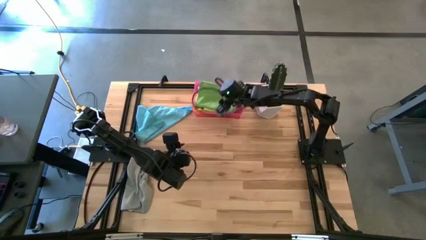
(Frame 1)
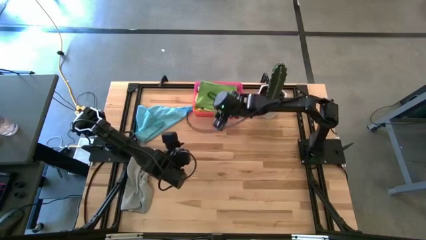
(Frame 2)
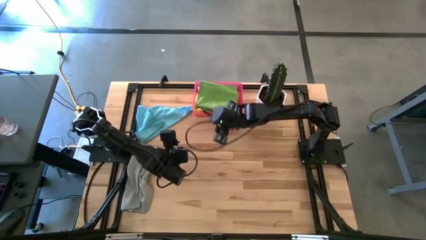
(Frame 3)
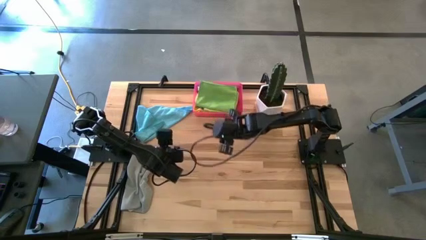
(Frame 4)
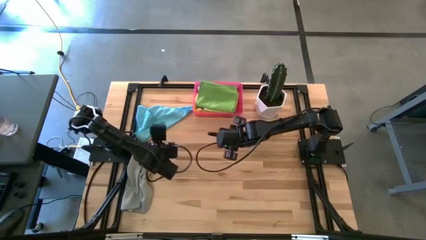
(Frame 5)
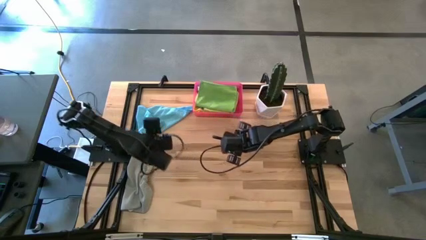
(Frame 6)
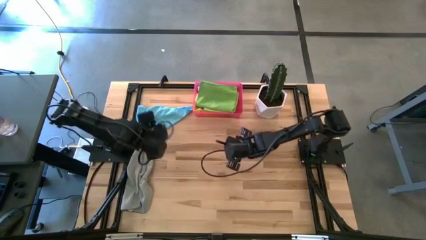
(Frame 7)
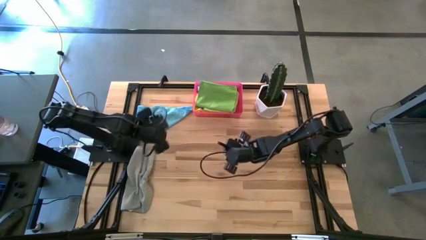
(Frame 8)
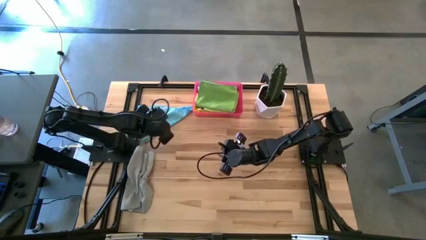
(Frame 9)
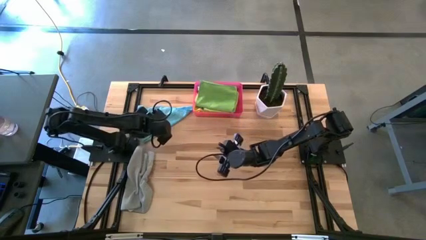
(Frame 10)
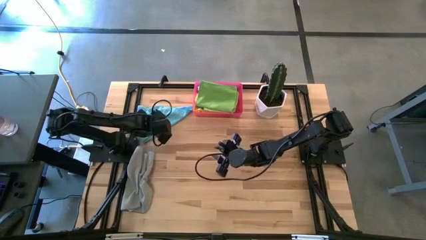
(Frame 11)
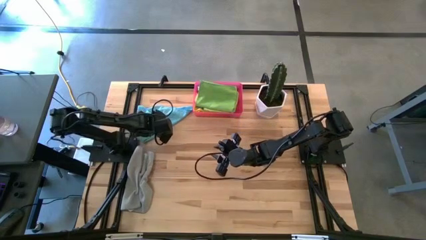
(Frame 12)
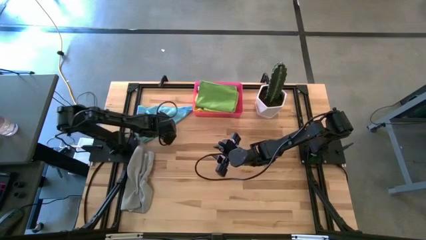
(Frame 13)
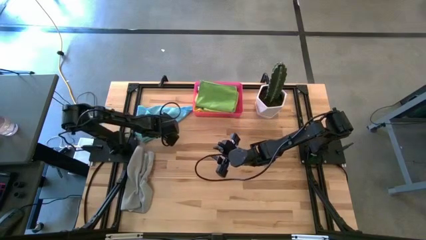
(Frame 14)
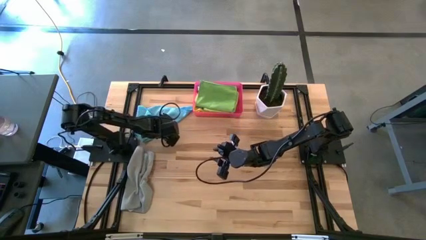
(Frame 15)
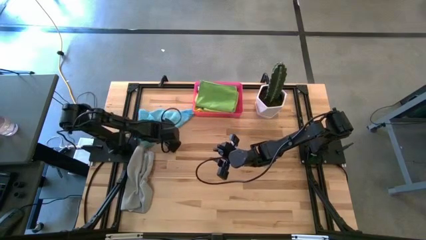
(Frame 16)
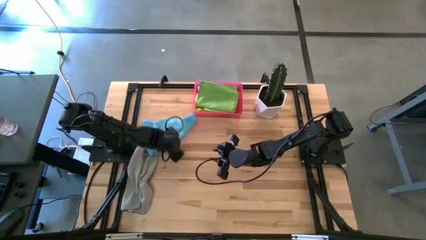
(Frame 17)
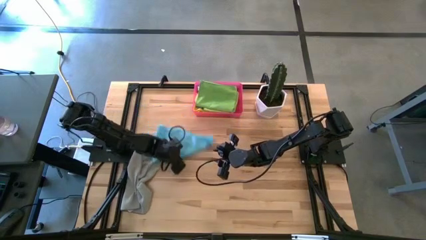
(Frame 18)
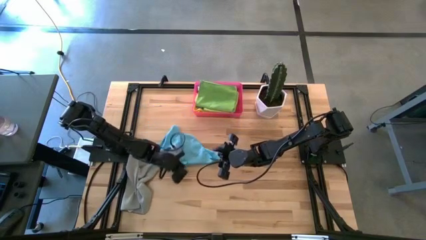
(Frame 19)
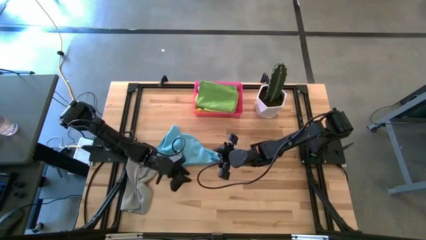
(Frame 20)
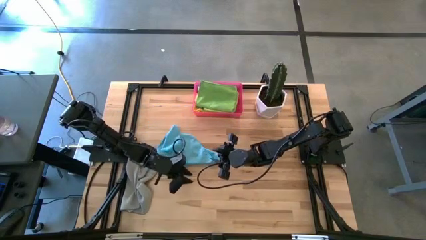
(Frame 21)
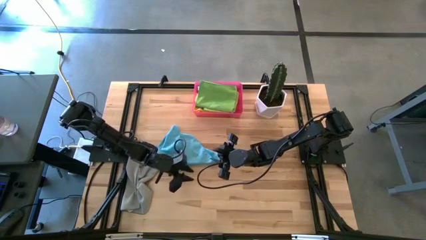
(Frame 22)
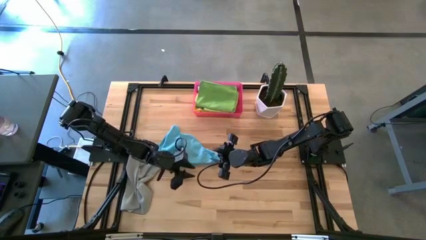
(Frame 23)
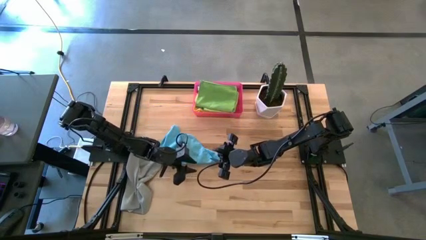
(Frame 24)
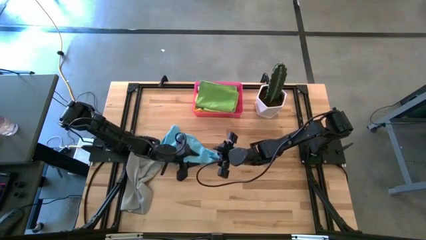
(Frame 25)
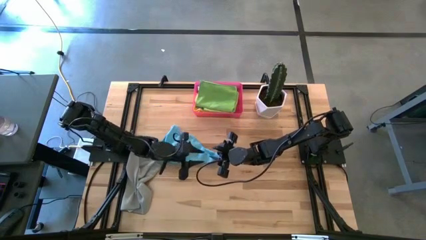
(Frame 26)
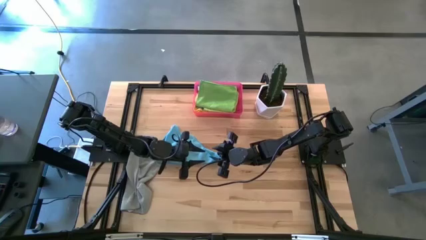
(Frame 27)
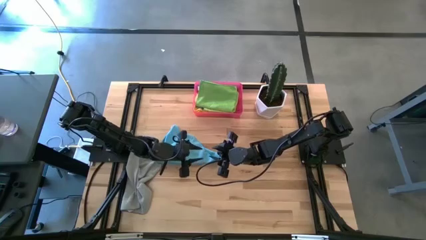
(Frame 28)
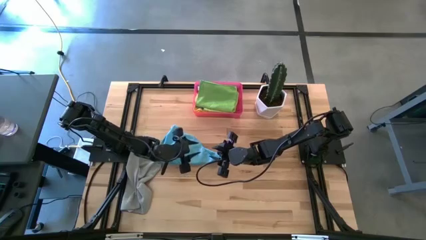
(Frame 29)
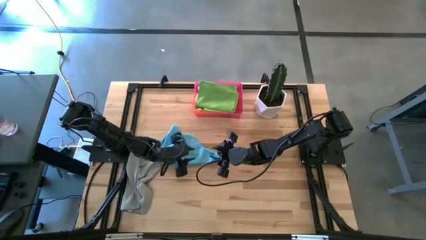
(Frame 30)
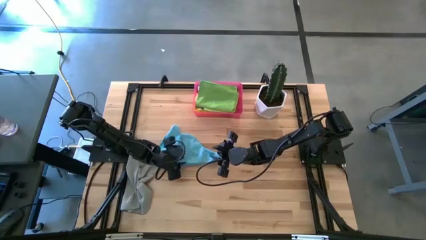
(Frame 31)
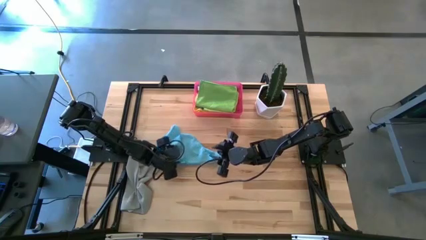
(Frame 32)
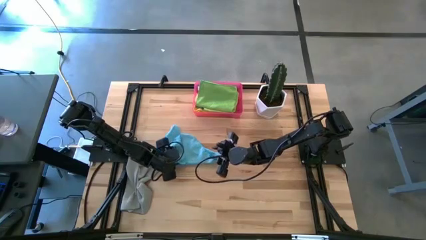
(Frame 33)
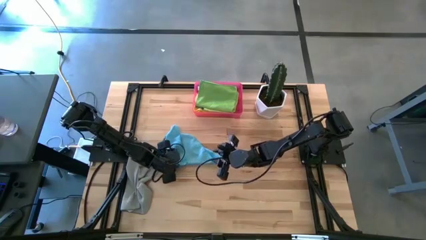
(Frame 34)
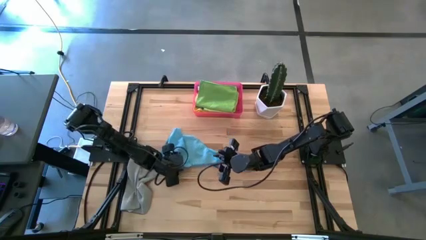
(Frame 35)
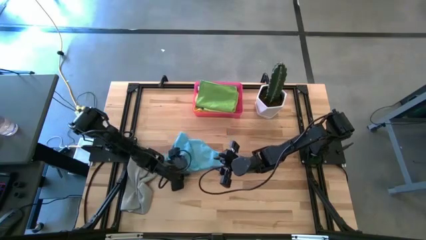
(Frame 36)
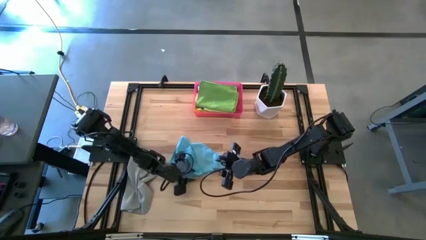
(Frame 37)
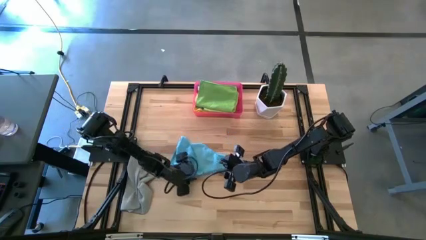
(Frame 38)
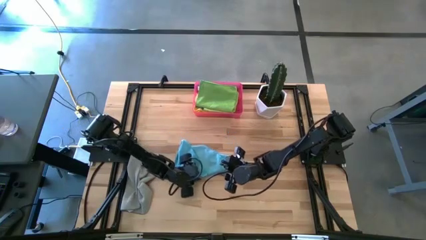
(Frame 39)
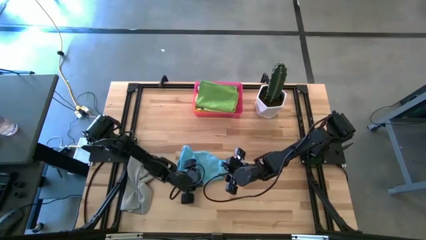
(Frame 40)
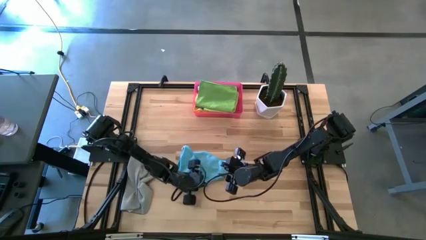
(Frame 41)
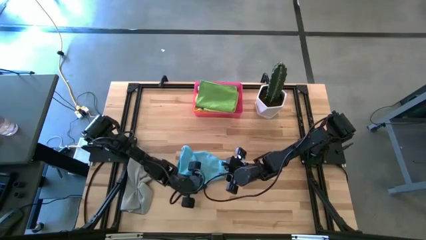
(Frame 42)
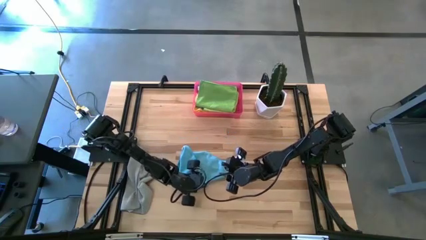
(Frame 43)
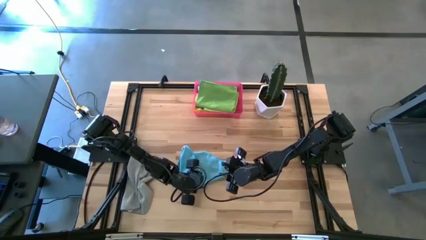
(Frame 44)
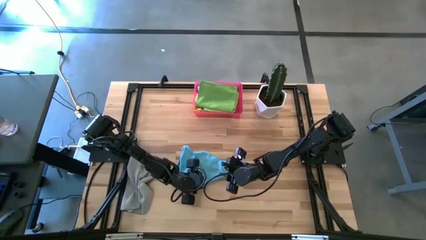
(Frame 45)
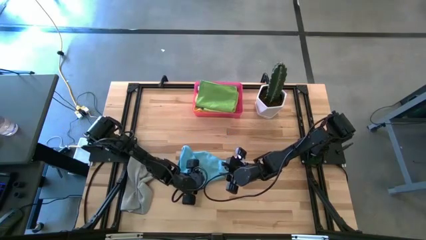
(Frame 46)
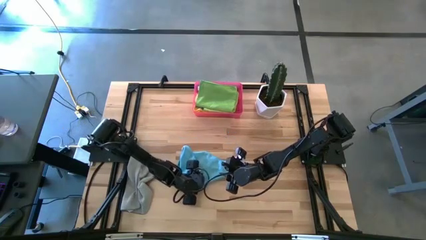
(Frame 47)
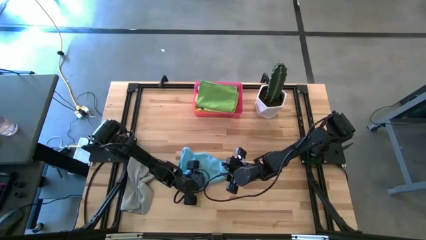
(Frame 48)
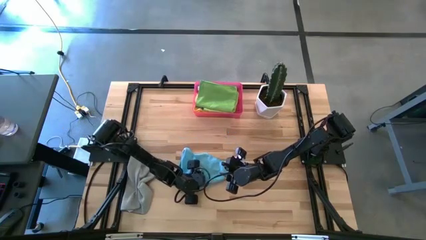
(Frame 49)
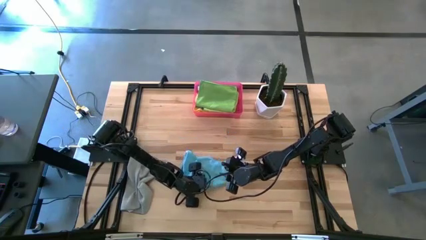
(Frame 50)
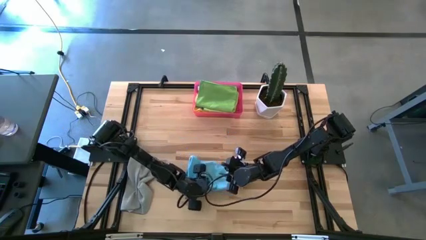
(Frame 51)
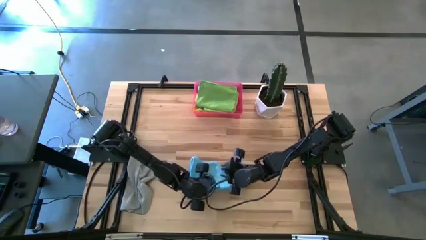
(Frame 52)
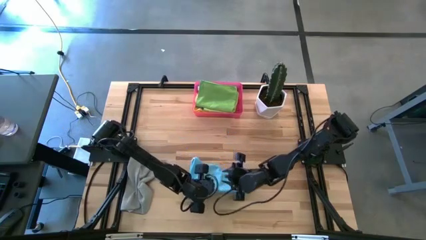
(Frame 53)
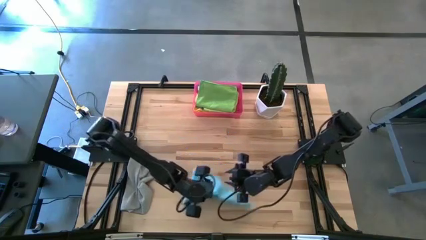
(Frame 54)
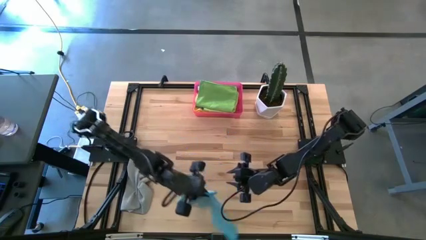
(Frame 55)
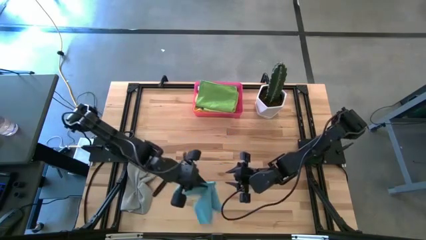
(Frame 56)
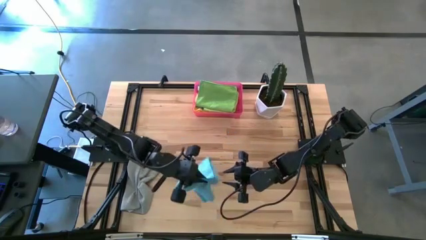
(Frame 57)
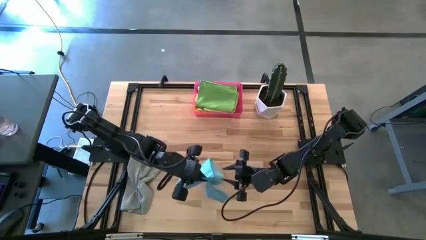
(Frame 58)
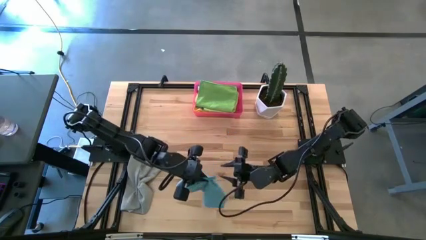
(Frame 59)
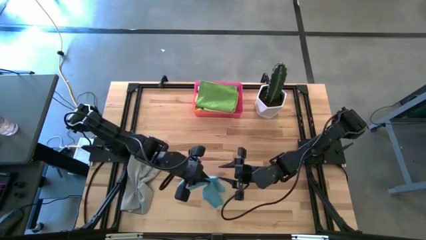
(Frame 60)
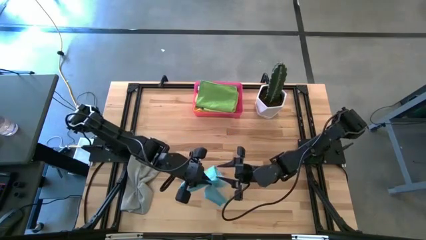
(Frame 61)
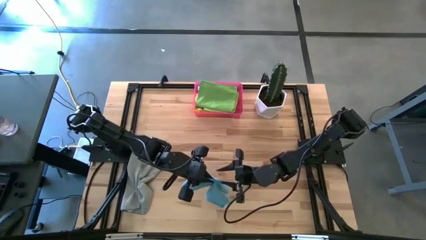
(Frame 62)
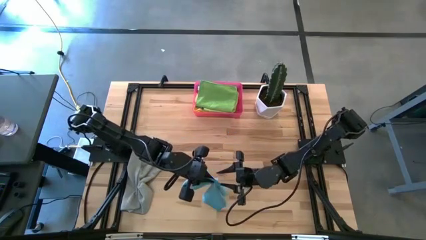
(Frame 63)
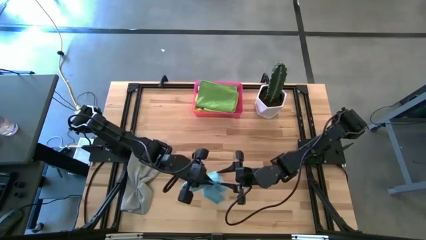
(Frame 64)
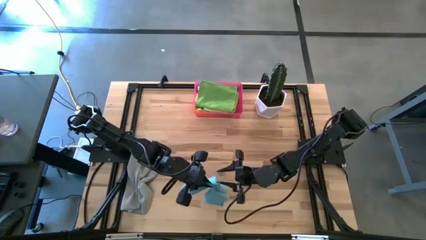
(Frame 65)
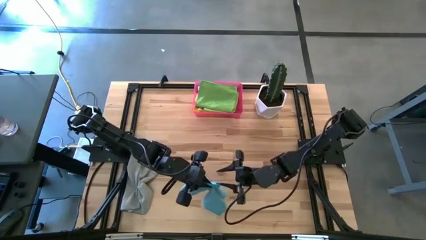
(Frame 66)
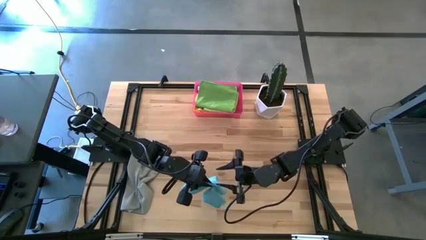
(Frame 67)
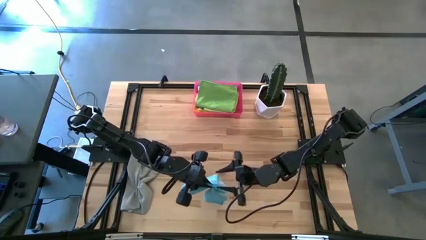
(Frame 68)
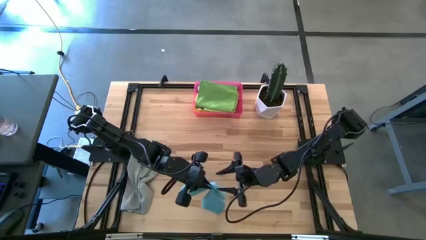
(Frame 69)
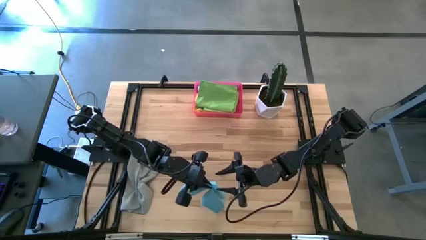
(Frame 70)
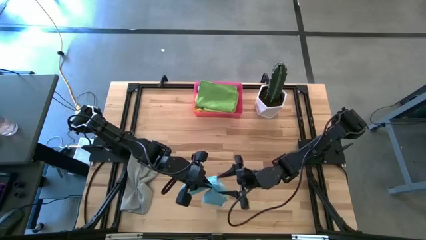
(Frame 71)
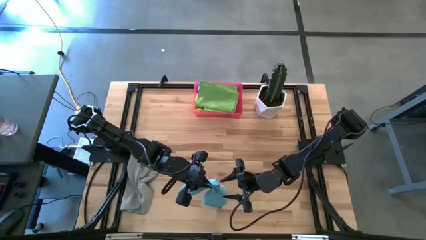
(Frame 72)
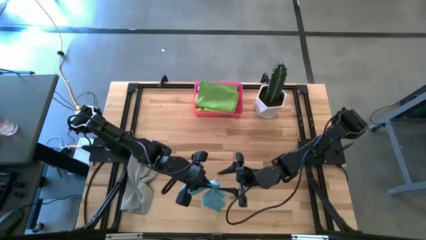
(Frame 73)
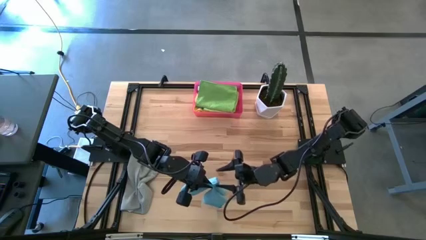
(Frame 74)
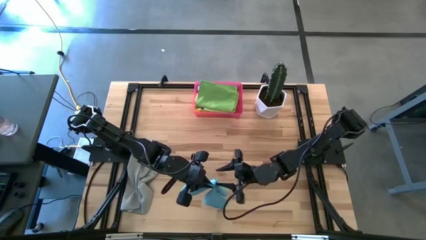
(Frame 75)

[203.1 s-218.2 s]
Task: Fold microfiber towels
Fold the blue microfiber cloth on the table

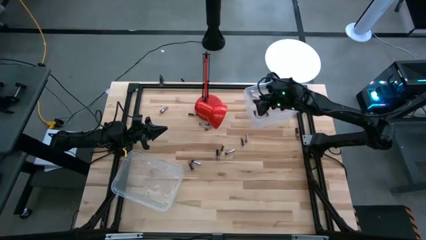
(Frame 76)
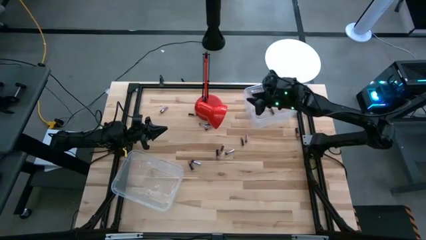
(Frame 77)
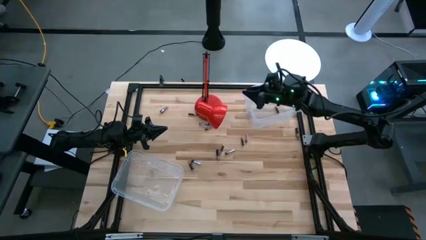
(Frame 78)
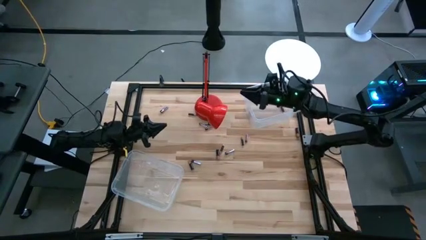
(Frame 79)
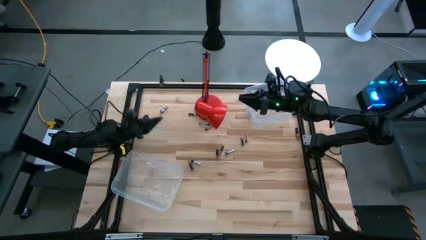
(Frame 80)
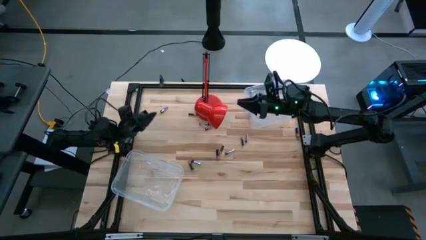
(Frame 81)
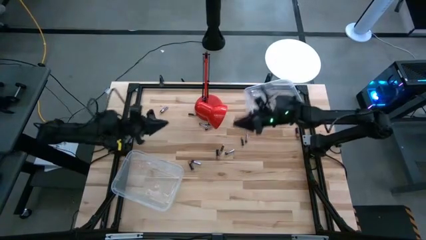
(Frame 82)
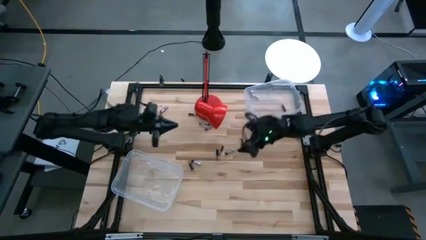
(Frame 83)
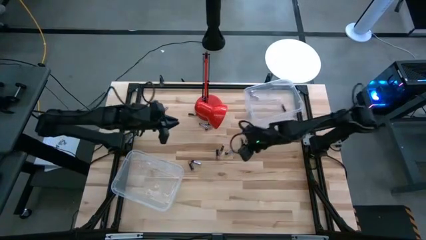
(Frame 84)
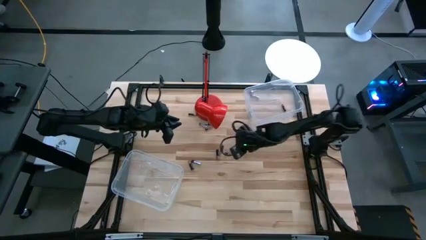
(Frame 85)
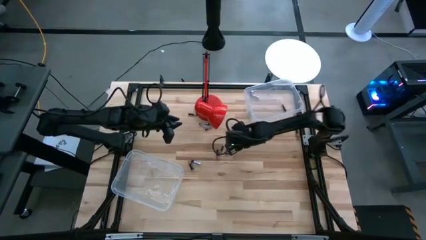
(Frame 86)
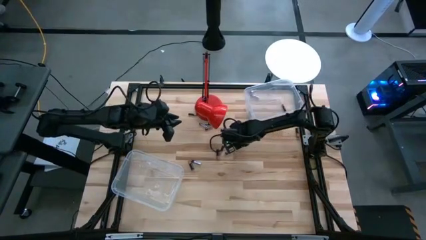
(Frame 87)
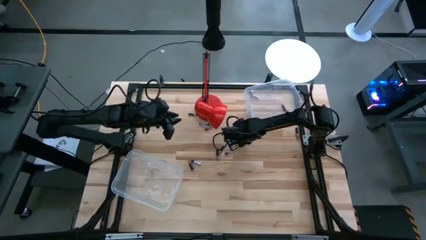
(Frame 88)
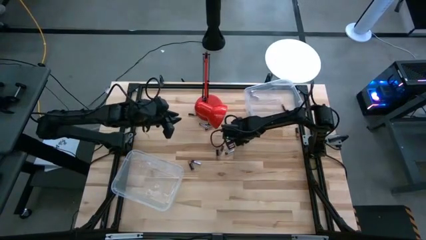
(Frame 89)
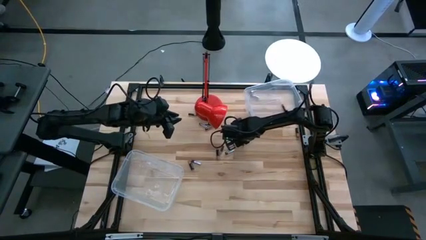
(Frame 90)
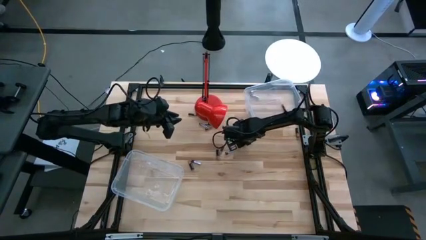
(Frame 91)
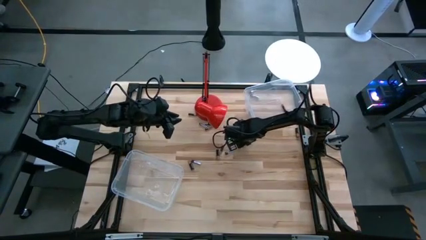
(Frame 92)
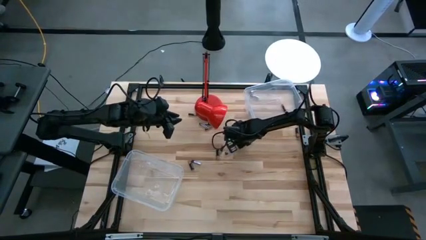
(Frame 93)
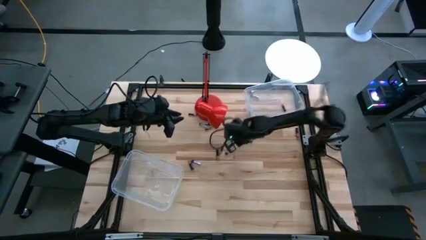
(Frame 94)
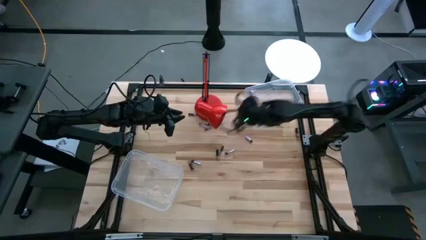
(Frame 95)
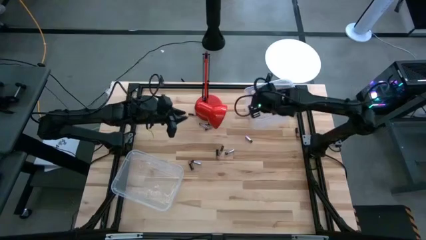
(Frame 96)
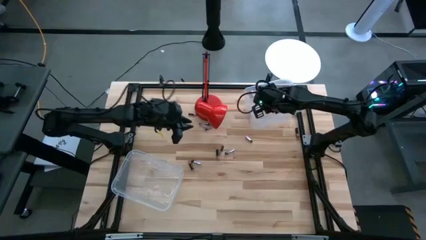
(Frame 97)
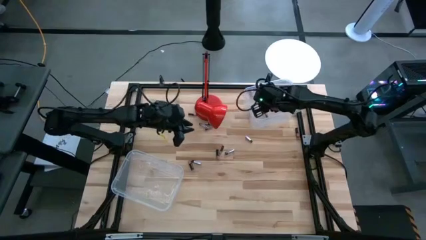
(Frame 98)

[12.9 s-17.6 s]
Task: Sort batteries
Put the black battery into the top transparent bin
